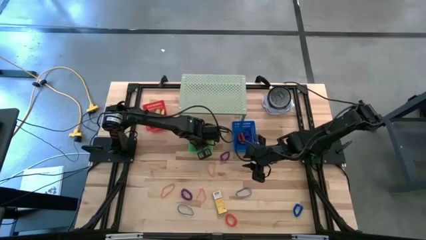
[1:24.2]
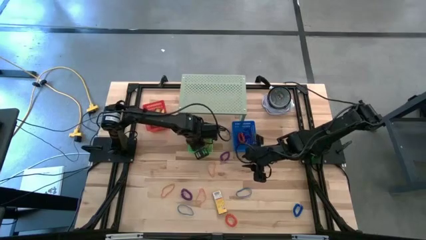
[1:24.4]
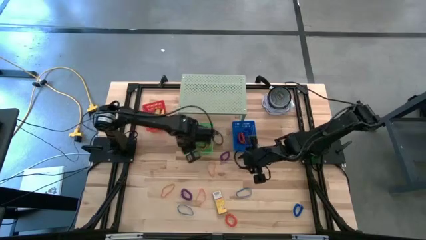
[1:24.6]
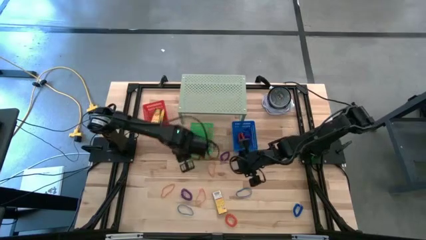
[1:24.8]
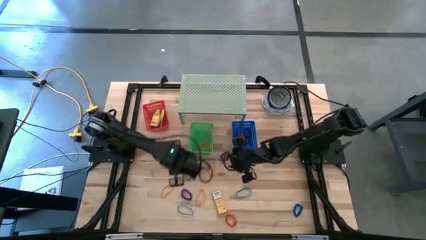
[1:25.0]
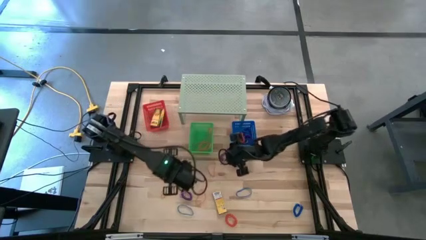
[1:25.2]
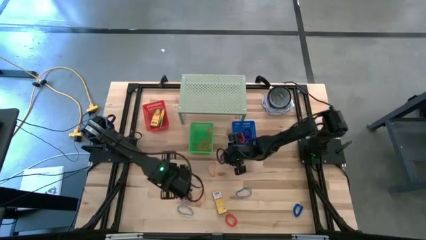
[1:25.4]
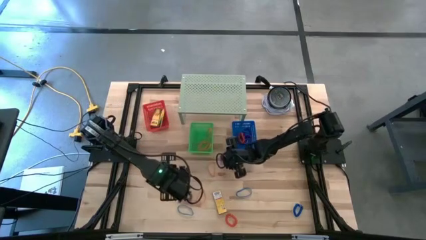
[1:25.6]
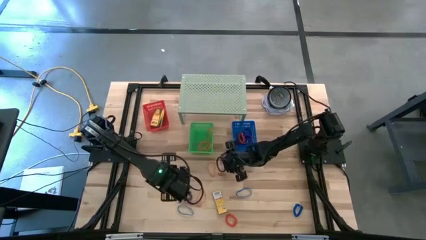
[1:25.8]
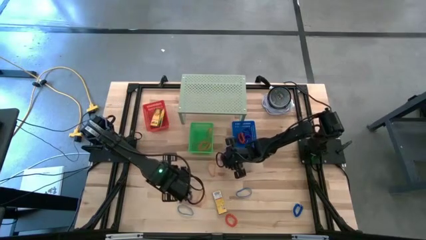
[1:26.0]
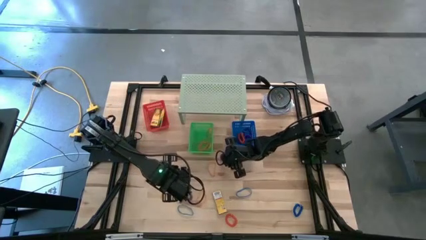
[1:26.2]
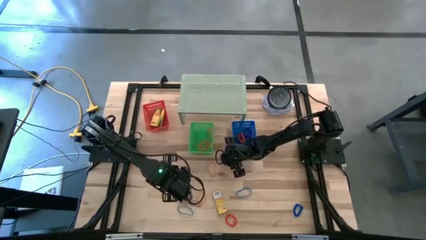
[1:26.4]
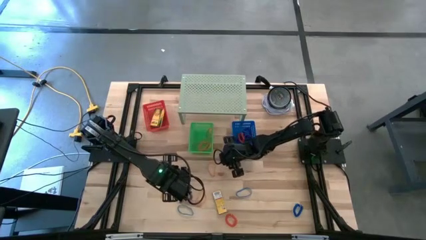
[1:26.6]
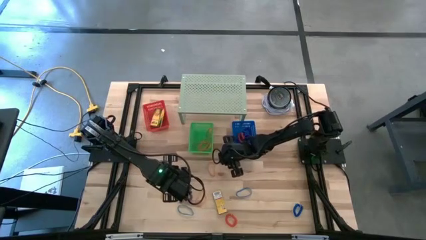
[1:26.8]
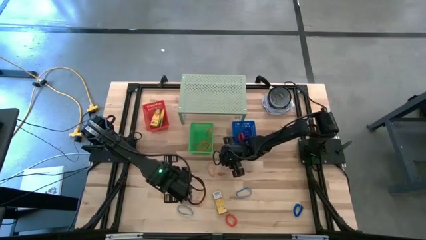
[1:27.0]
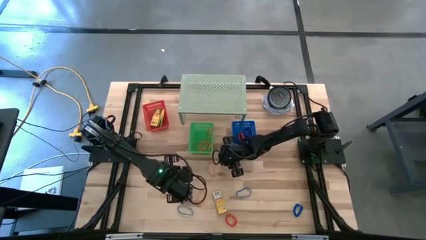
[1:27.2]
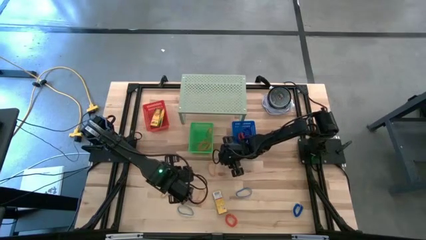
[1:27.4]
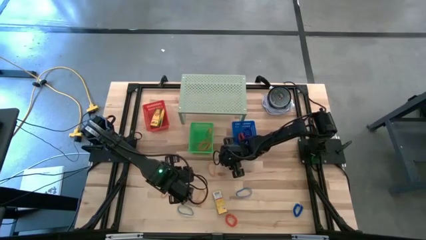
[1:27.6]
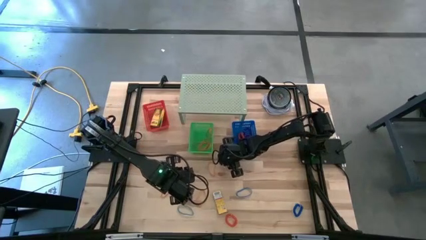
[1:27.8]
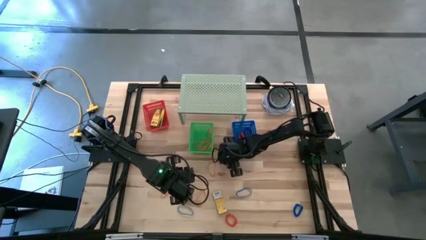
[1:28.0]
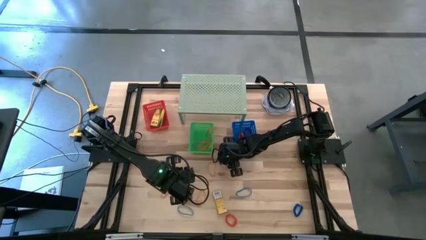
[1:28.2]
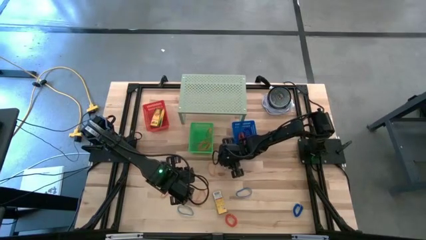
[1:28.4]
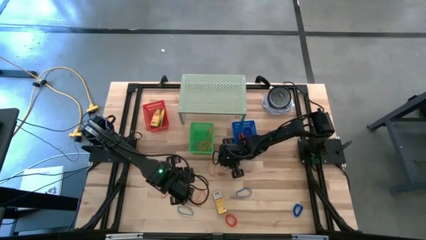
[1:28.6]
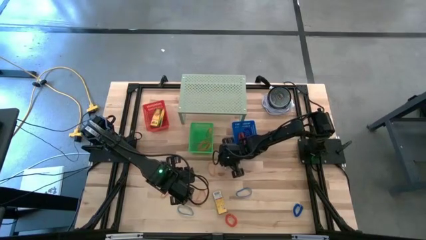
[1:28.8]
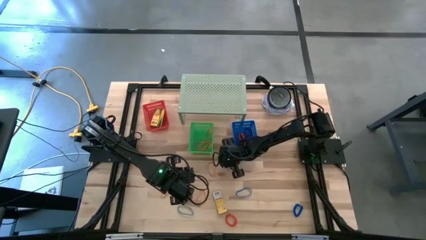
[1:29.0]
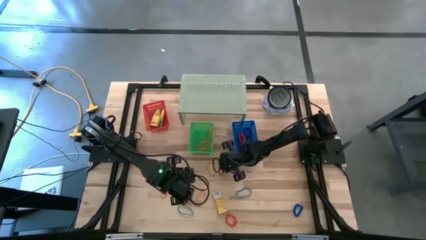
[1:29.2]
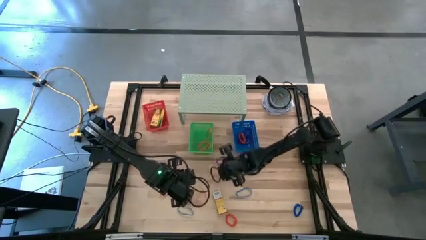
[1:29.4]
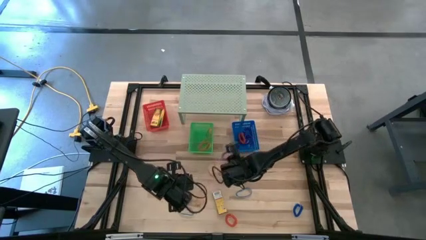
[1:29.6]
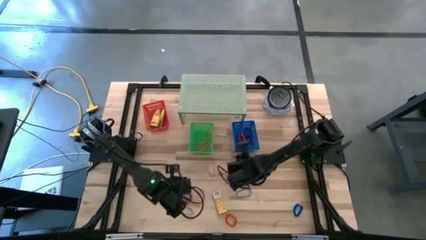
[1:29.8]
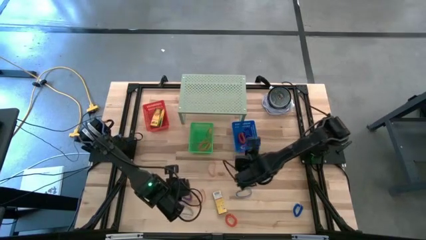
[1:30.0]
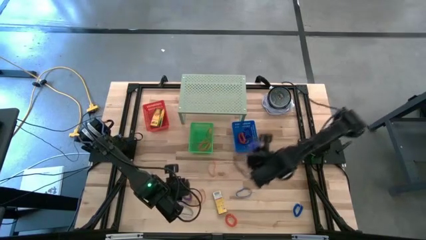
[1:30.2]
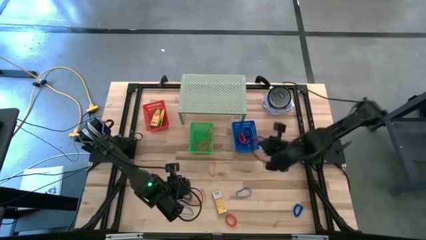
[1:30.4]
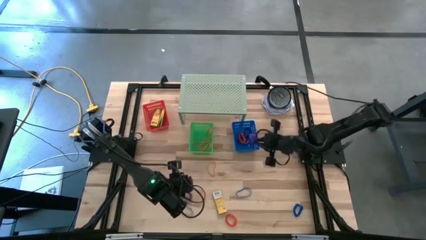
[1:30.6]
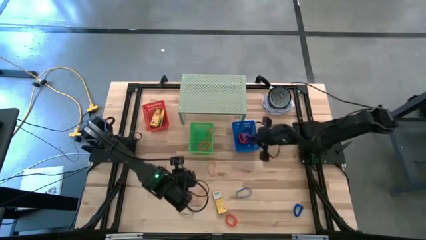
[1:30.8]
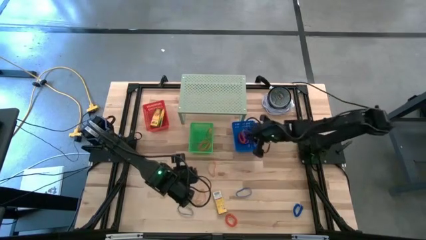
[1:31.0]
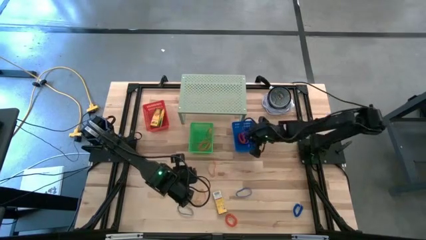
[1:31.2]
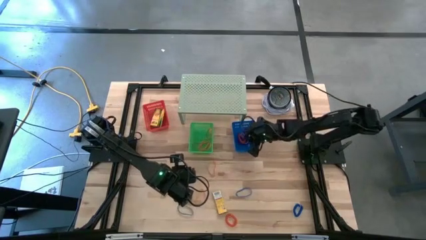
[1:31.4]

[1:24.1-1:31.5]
Task: Pick & Place Office Desk Supplies
Put the violet spring keychain into the blue bin

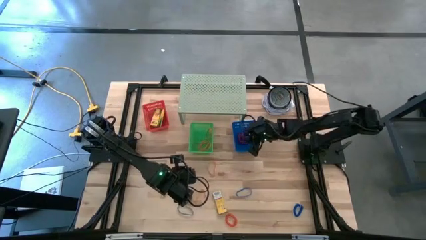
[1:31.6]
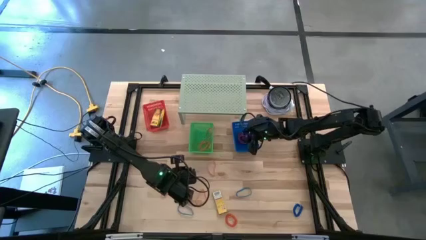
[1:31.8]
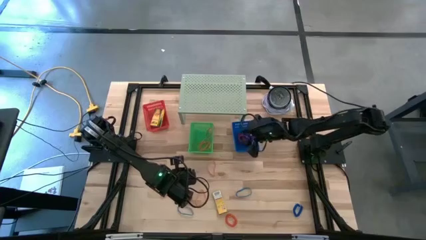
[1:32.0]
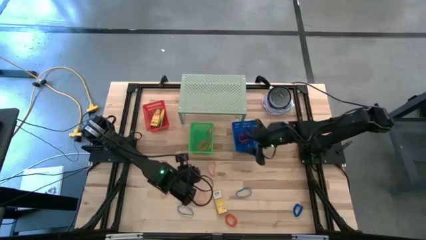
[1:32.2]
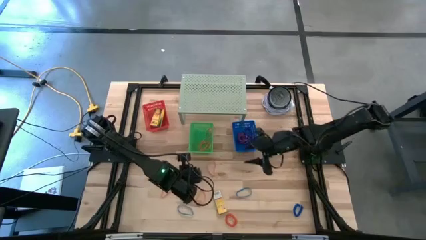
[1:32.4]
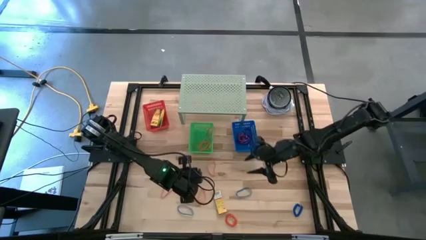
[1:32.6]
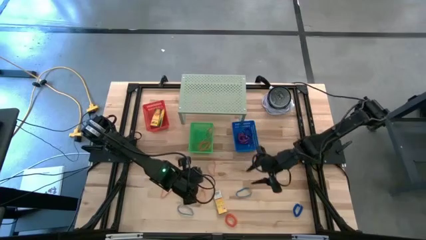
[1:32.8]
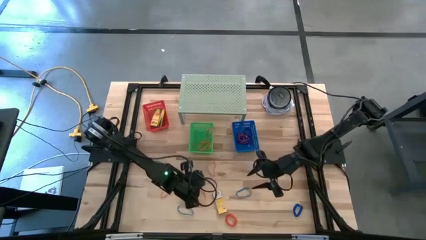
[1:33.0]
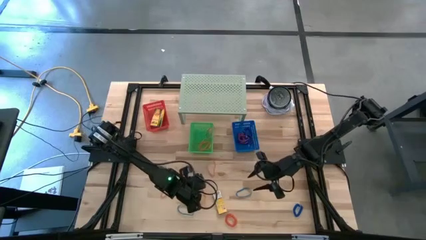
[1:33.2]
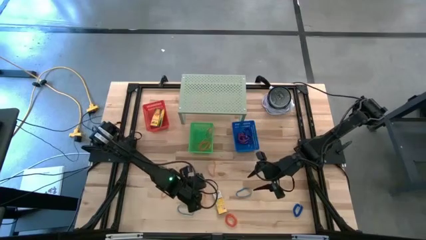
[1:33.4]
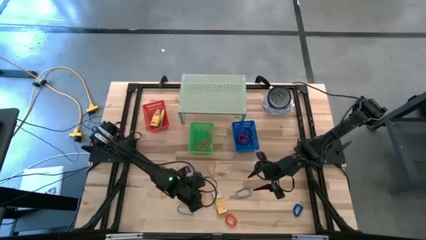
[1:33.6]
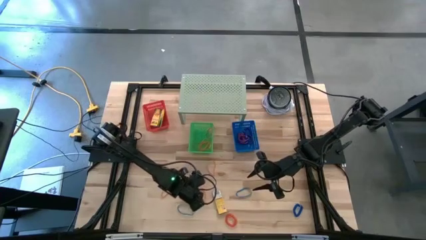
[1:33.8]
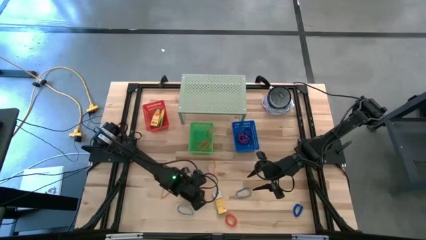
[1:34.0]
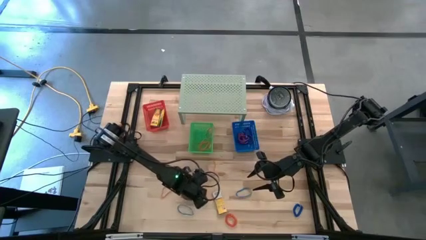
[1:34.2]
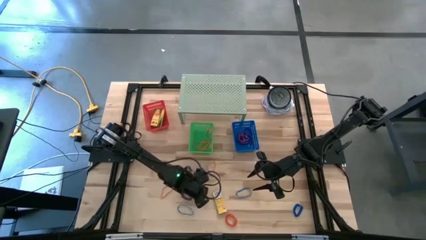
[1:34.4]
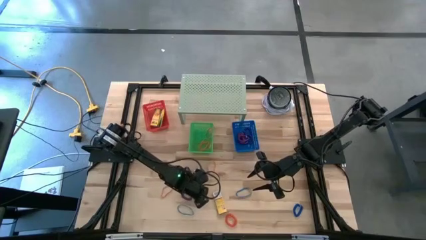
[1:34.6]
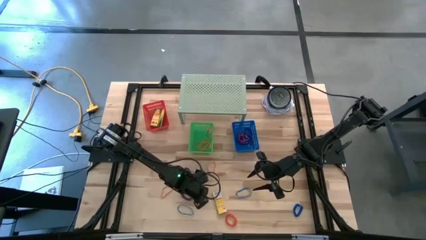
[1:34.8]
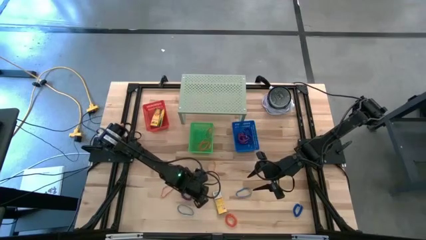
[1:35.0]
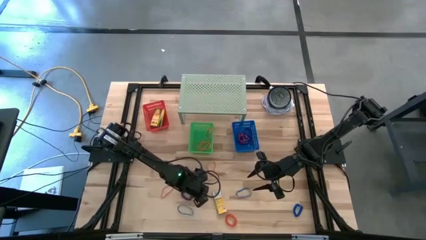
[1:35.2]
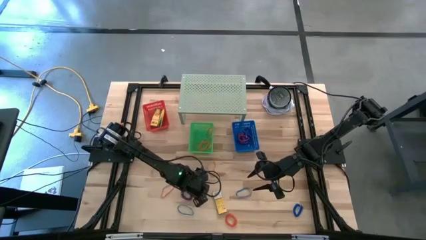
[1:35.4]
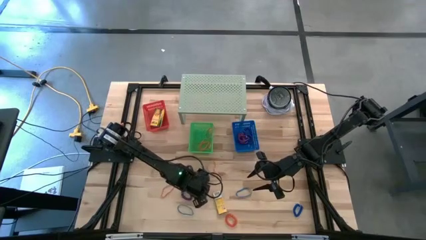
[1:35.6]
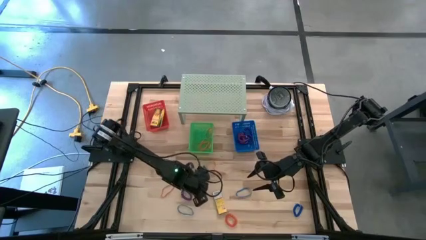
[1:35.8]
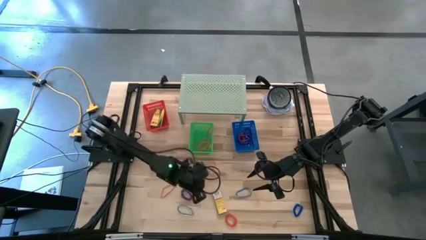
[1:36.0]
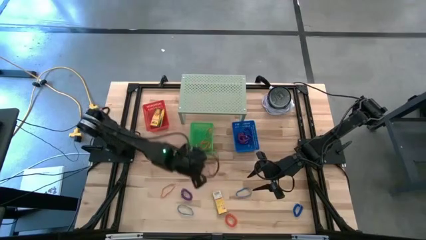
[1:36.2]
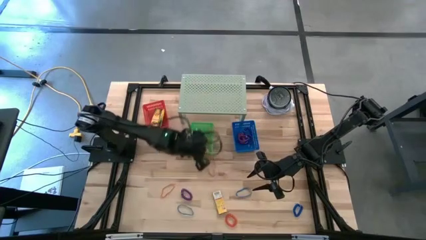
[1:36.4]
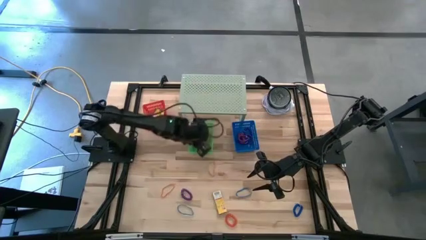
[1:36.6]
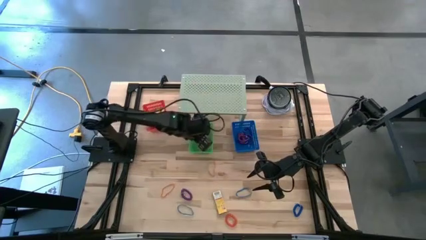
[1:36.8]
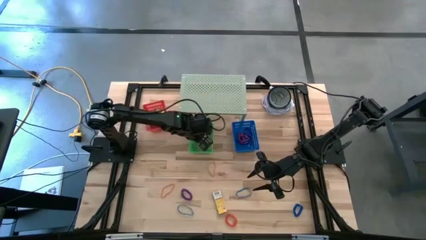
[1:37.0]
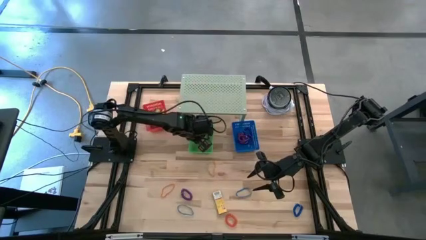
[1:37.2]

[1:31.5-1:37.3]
Put the orange rubber band into the green bin

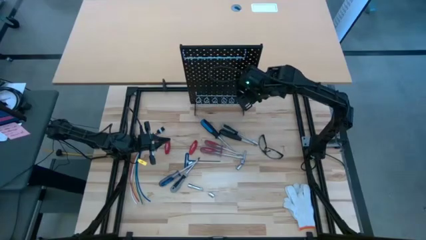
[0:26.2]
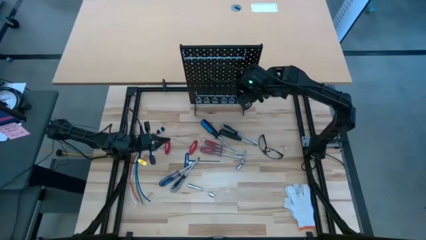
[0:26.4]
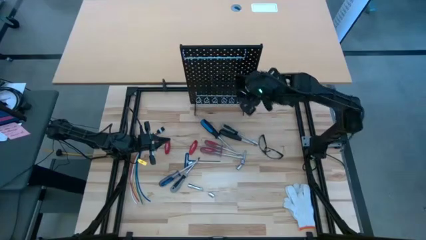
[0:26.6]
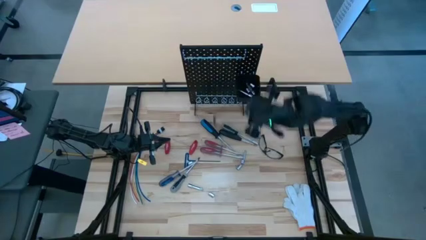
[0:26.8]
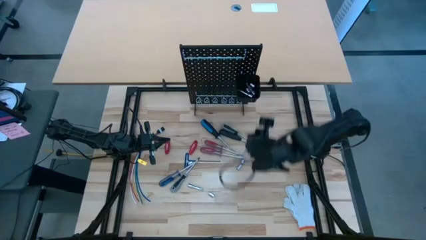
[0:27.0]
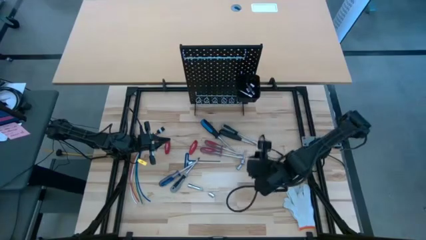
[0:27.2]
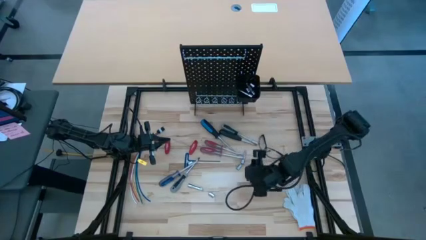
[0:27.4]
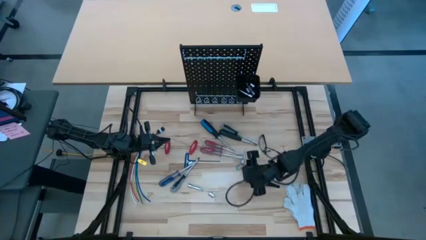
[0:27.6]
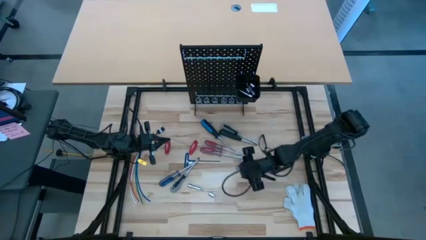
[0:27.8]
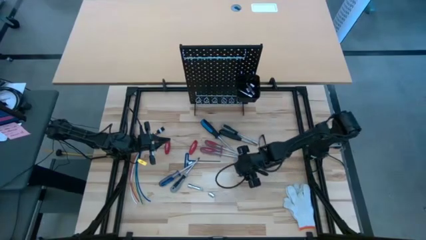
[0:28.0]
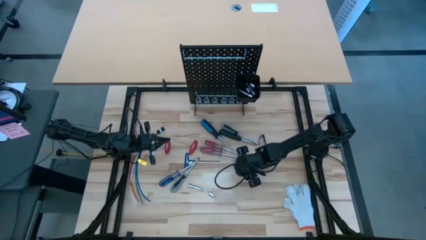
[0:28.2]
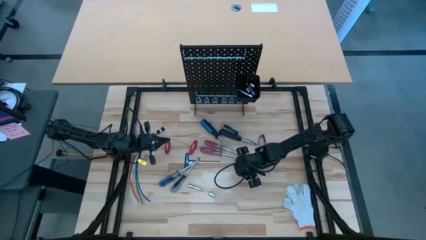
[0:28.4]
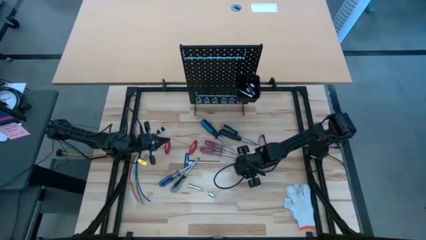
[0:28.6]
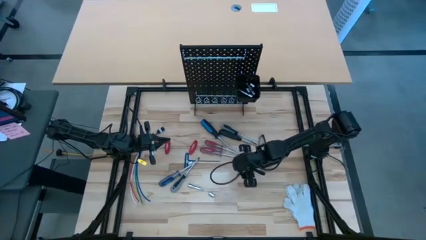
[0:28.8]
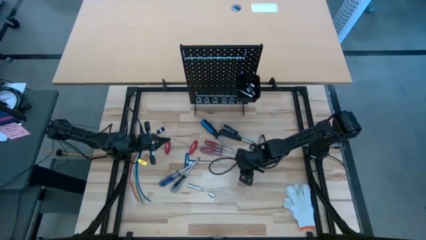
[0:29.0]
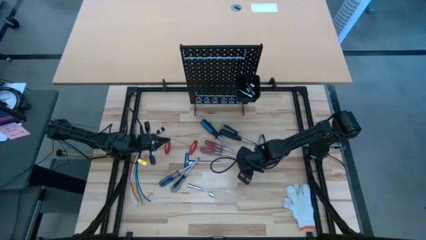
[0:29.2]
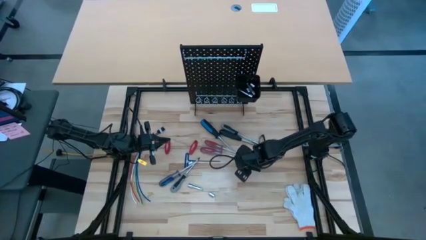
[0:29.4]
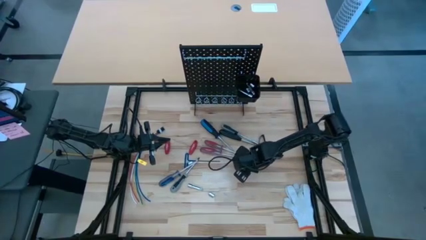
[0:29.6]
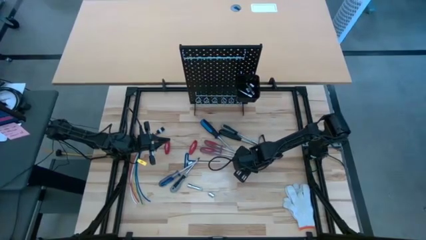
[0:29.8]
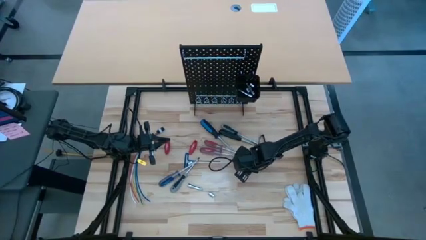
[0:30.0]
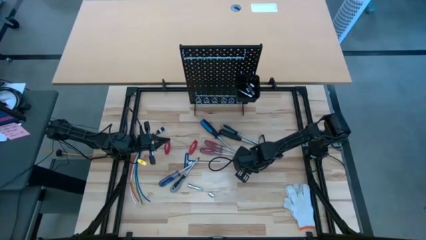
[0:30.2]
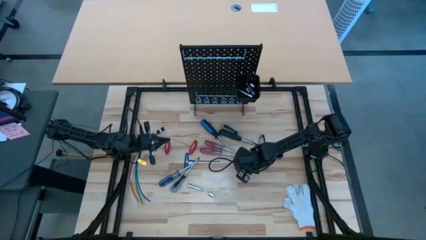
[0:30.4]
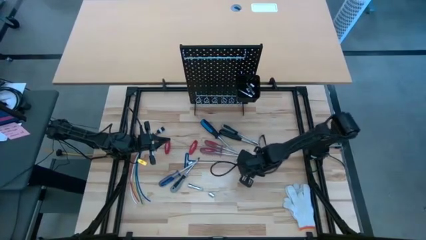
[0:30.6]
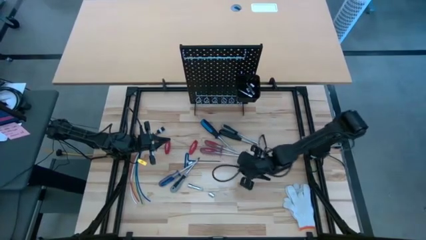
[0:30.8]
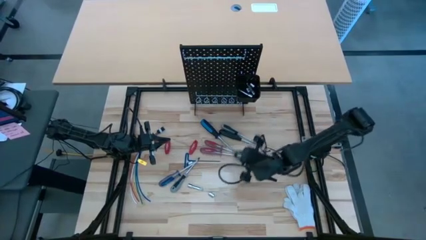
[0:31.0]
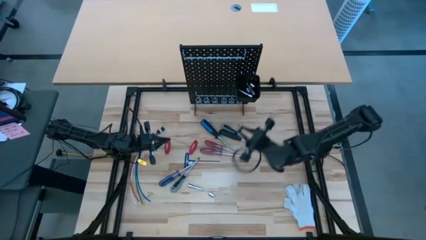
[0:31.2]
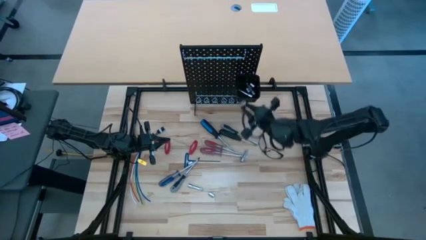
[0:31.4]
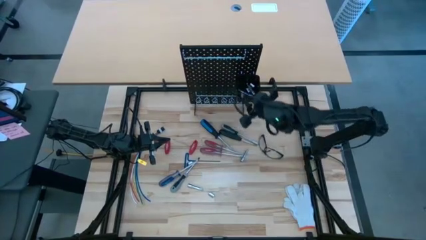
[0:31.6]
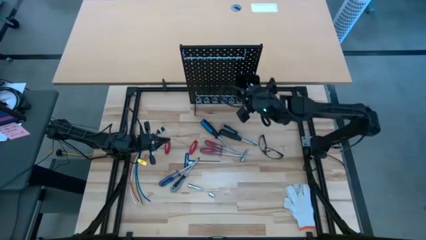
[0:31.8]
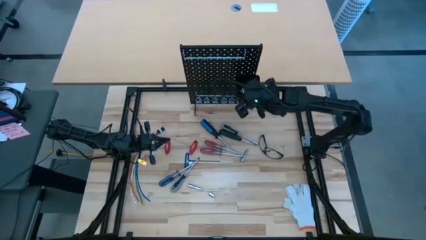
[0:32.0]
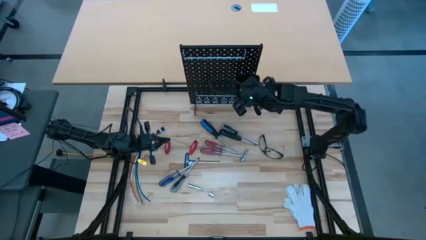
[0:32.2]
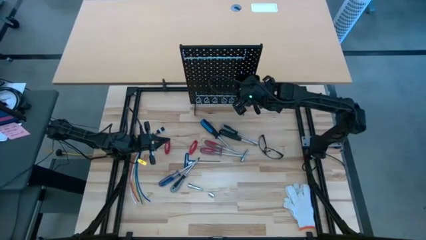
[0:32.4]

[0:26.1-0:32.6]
Task: Hang tools onto peg board
Put the socket into the bin of the pegboard
